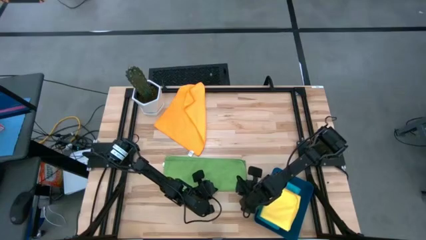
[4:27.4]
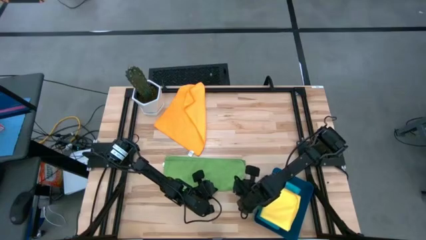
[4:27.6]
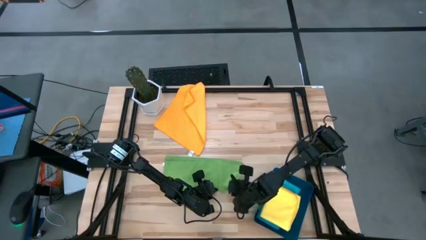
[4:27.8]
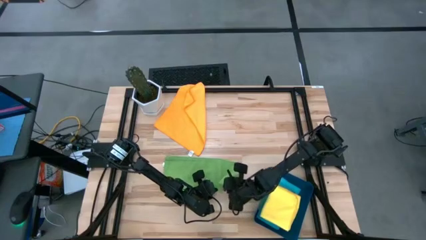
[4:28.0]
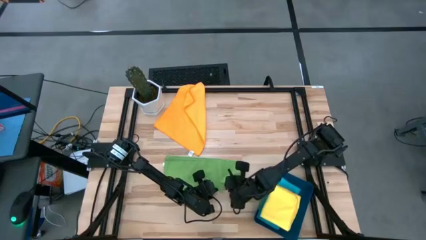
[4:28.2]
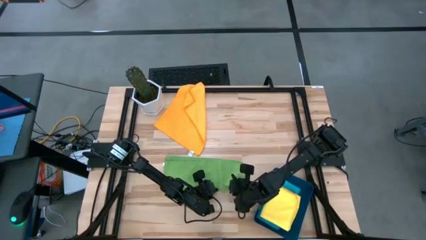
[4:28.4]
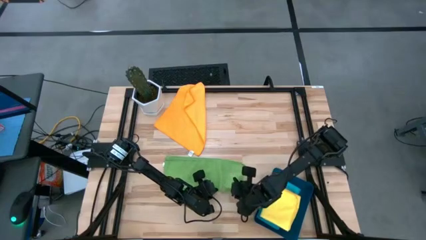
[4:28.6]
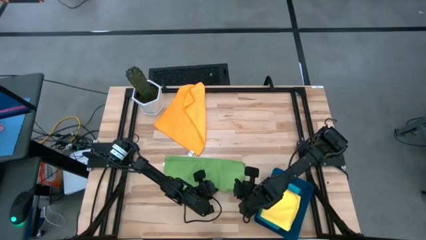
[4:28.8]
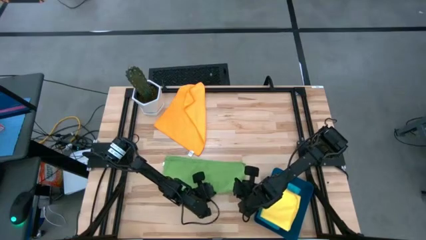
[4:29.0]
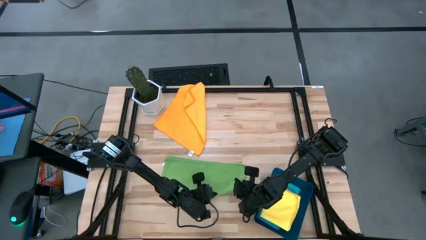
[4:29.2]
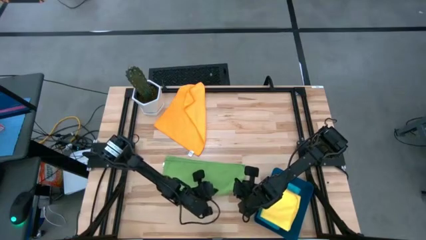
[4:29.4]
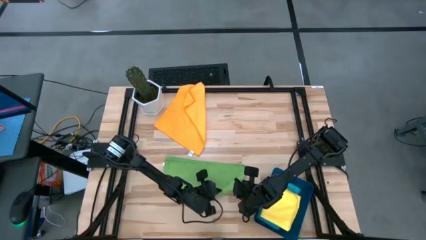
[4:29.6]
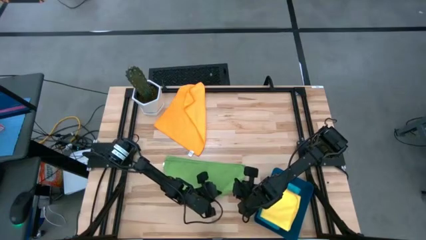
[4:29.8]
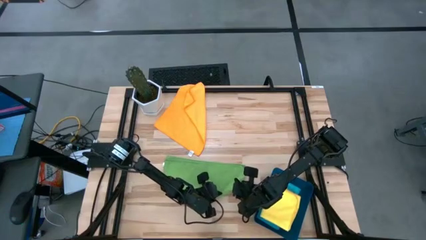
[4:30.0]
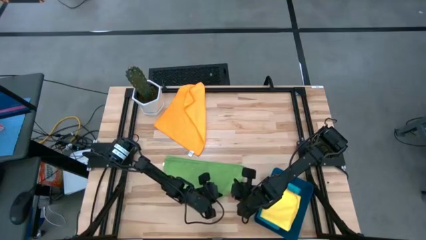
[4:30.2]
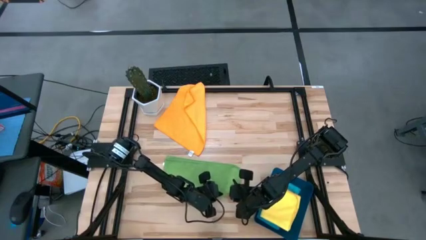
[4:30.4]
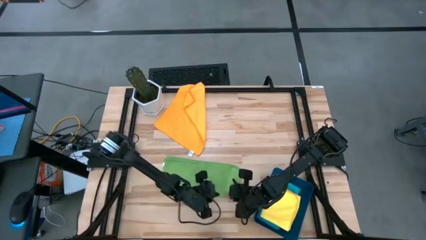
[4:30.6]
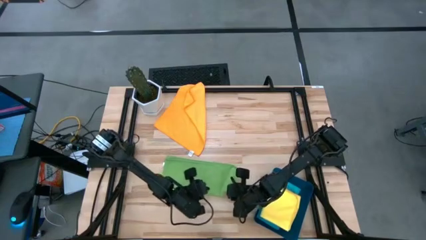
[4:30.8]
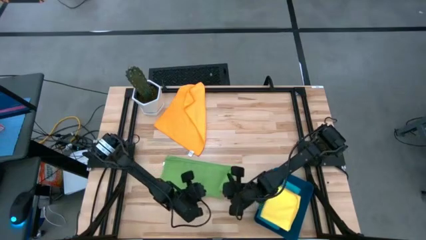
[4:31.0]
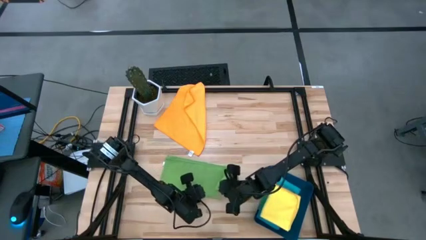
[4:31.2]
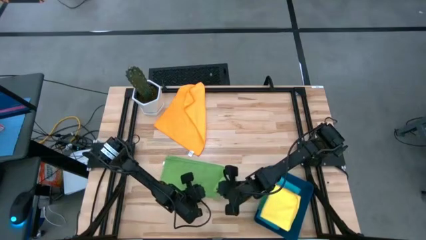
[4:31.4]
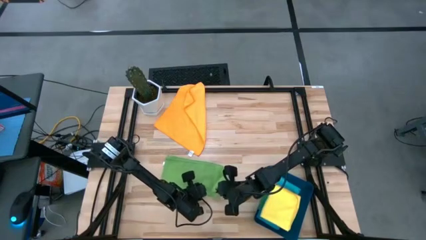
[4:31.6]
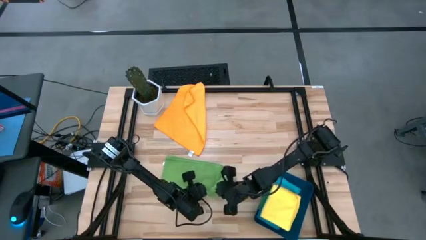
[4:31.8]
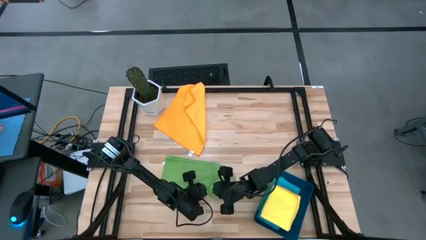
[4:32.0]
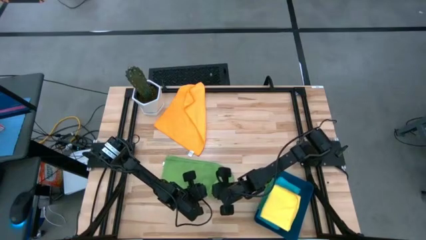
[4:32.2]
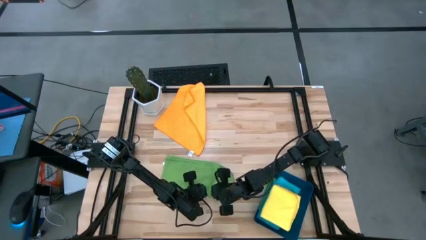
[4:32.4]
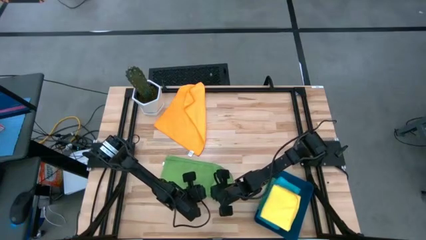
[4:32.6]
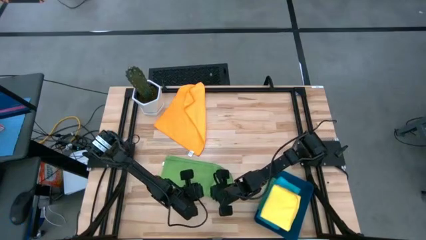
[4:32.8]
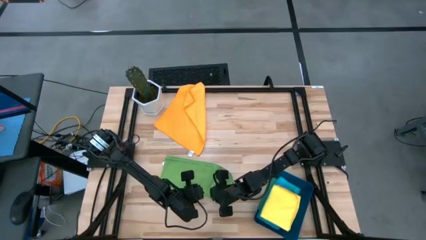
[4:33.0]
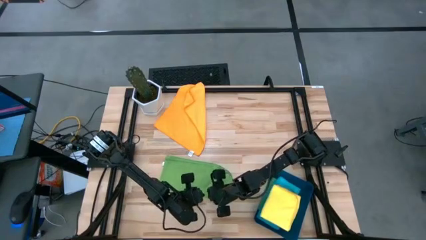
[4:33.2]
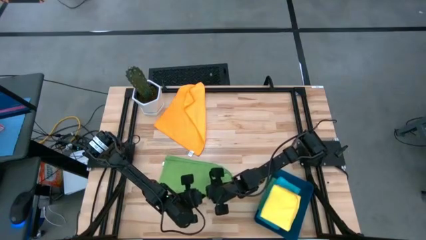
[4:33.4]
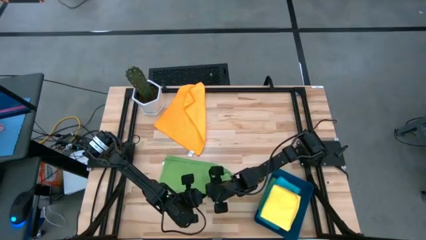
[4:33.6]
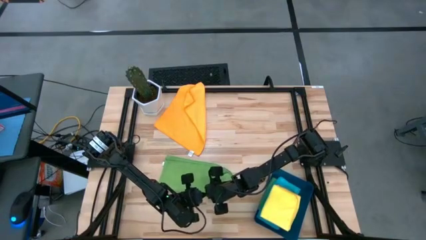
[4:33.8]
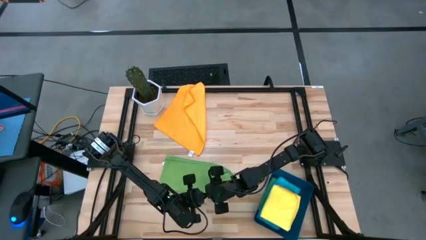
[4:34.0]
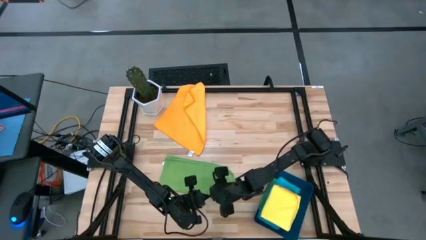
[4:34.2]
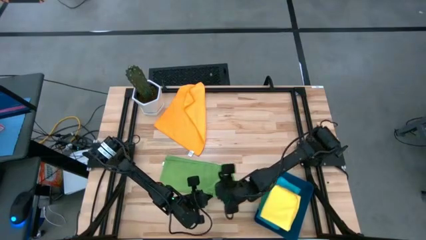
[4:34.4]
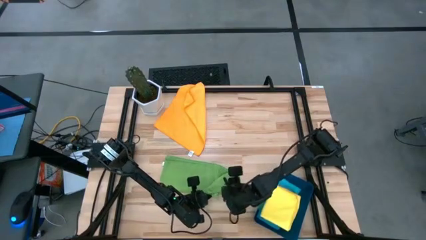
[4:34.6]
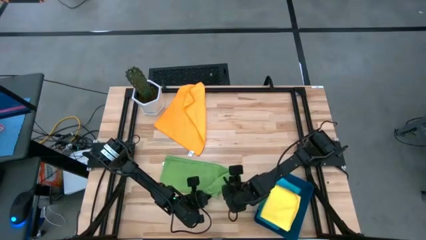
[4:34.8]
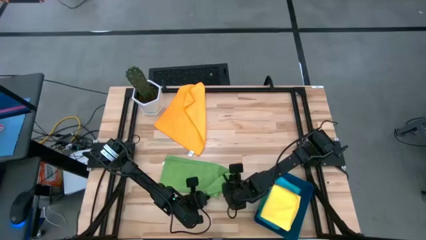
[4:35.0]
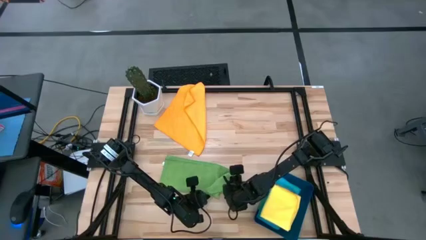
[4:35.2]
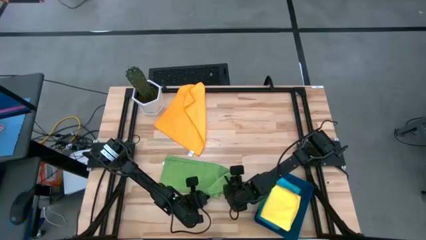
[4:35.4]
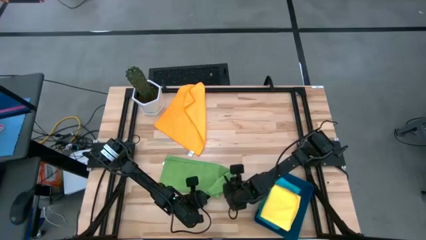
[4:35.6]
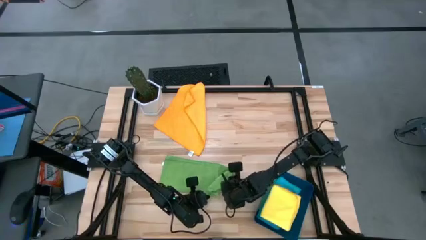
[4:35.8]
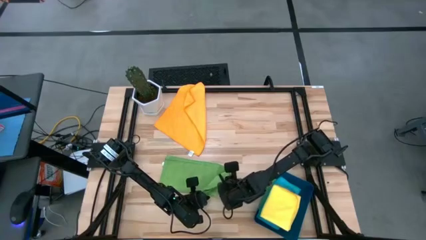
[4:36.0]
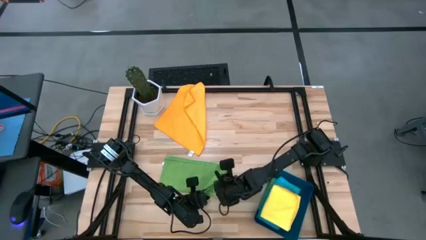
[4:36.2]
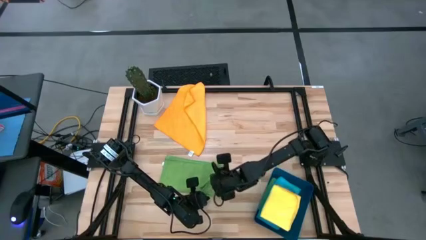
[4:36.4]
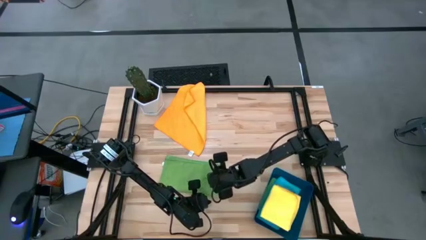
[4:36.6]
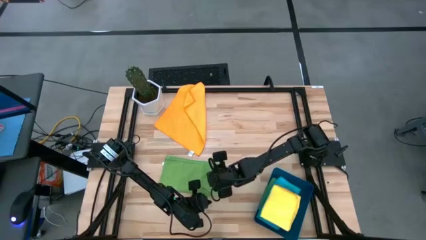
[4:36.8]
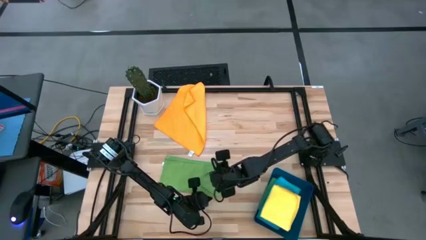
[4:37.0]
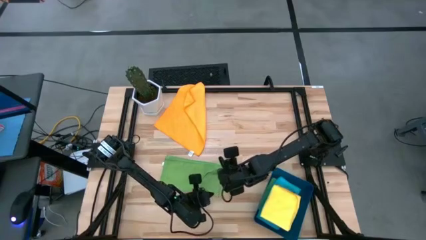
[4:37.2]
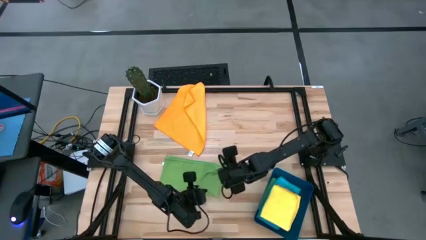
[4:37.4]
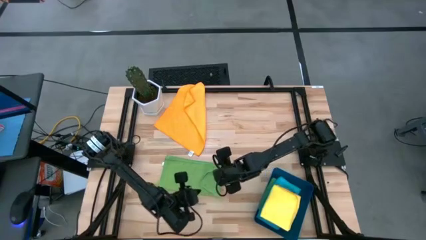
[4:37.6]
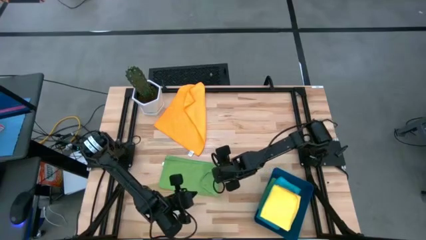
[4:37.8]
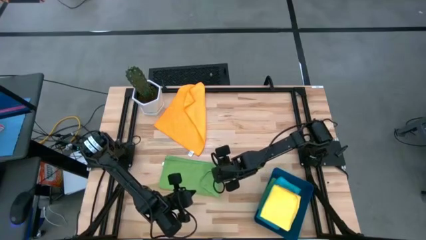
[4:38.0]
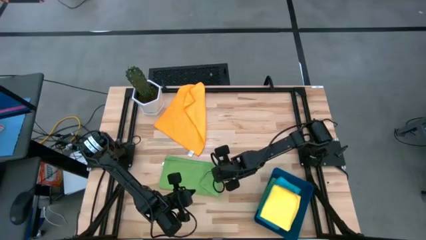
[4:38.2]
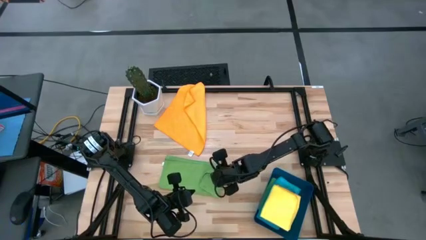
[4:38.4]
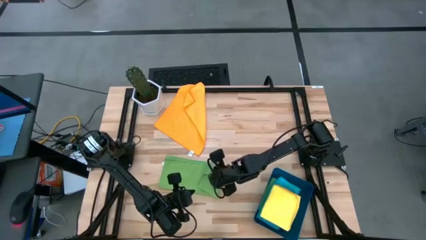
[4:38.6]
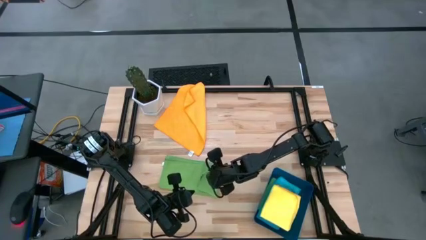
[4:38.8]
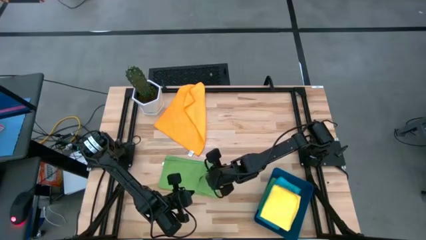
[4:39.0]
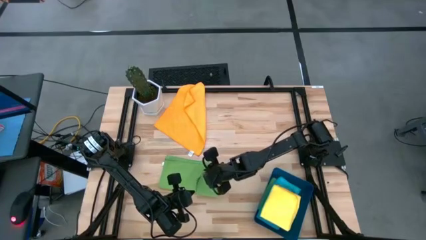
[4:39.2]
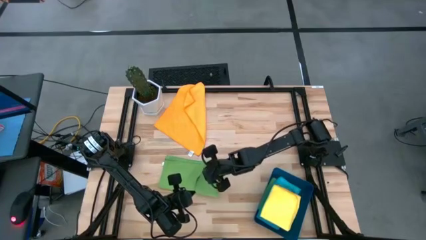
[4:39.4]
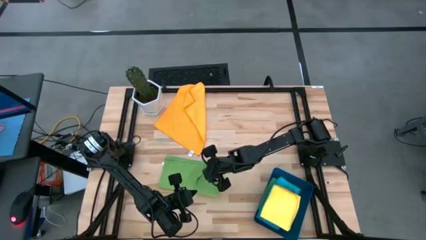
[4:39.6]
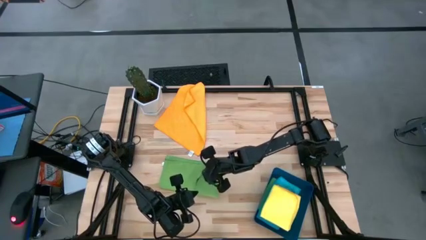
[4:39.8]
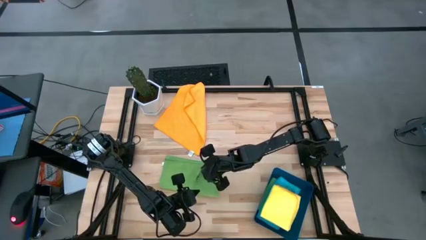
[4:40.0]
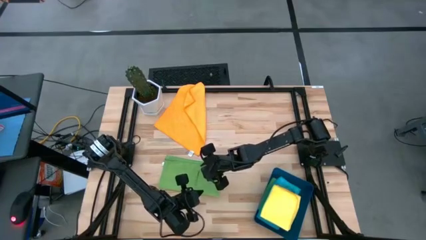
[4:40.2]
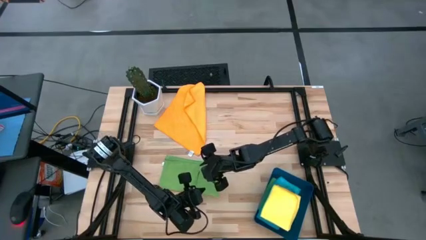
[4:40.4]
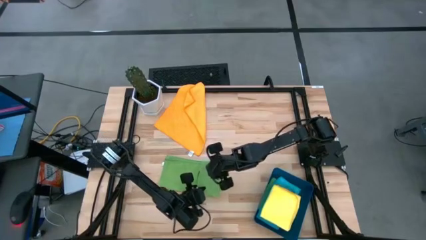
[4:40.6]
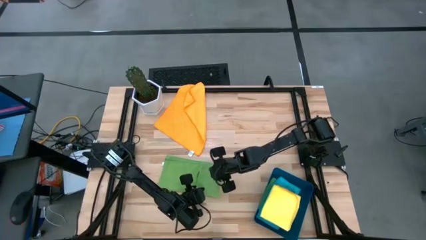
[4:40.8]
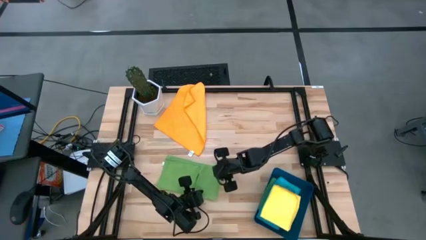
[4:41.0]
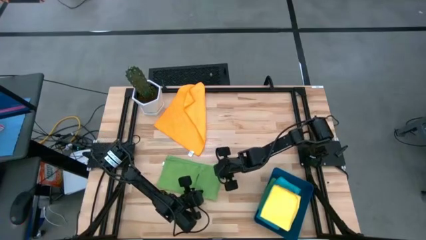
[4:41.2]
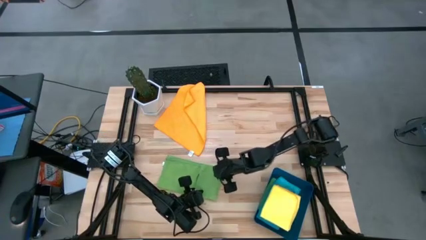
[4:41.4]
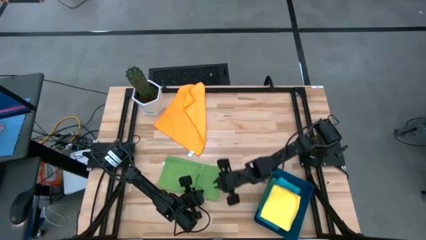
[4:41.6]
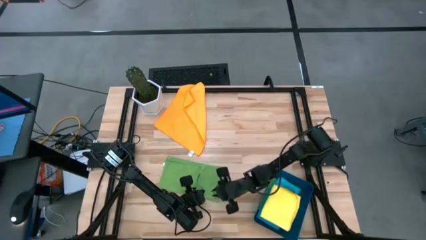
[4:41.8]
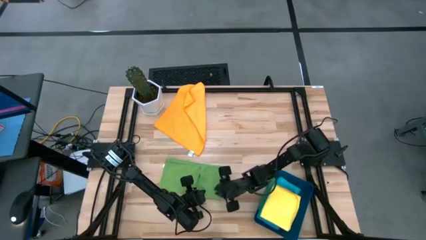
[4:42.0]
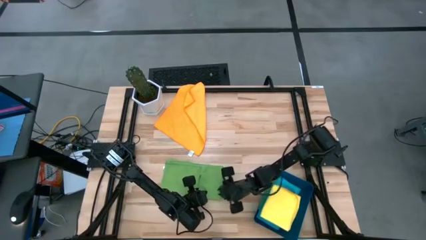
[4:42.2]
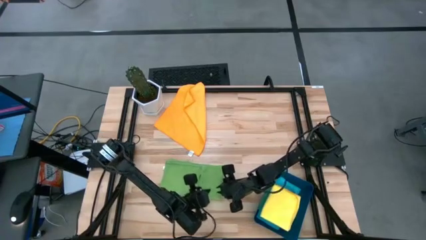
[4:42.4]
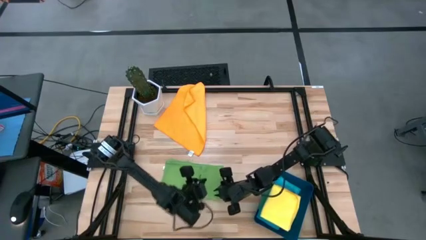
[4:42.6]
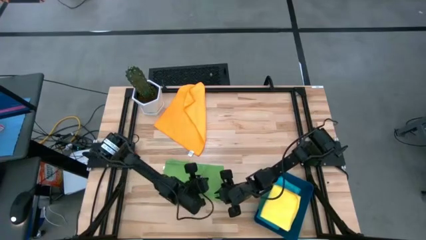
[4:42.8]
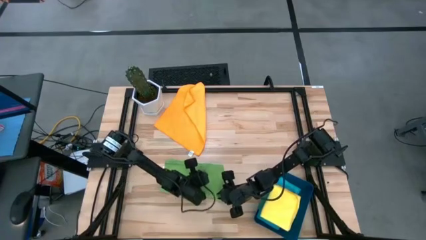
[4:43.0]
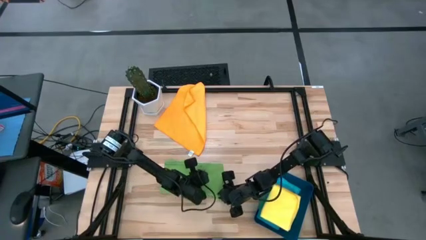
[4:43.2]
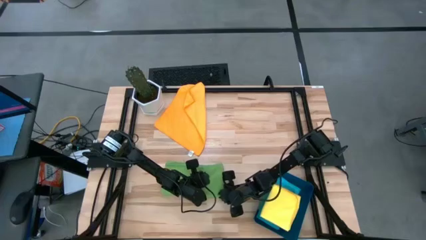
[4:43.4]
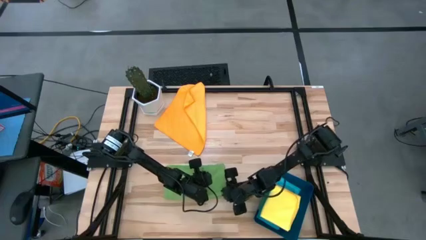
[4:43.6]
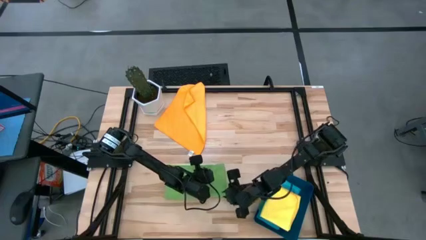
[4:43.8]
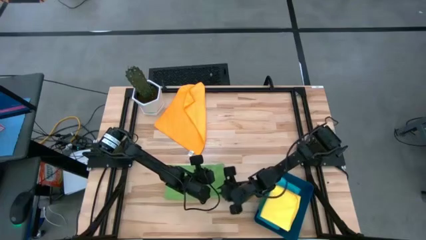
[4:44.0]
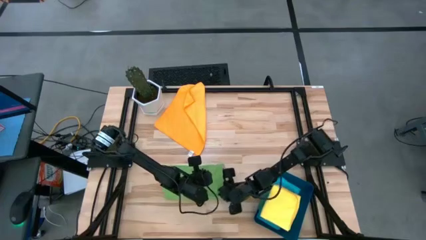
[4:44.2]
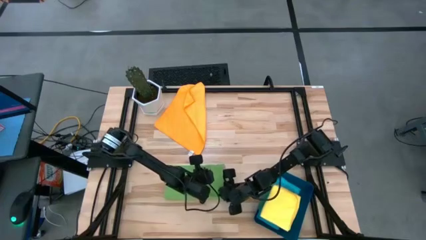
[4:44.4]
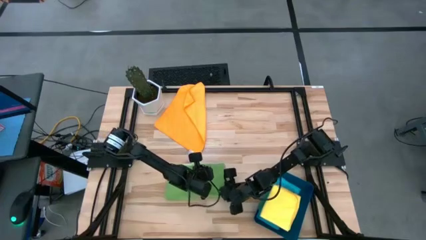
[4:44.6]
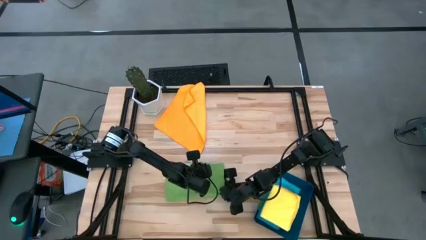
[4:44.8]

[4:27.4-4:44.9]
Task: Fold microfiber towels
Fold the green microfiber towel
